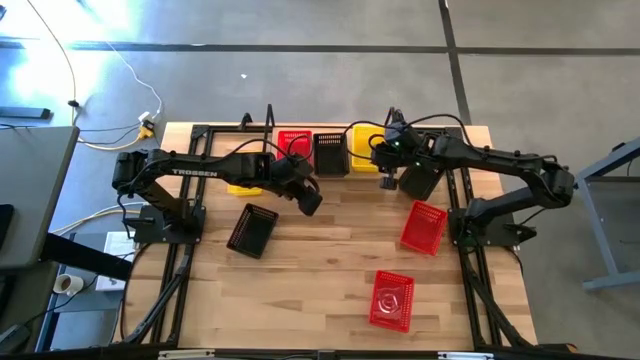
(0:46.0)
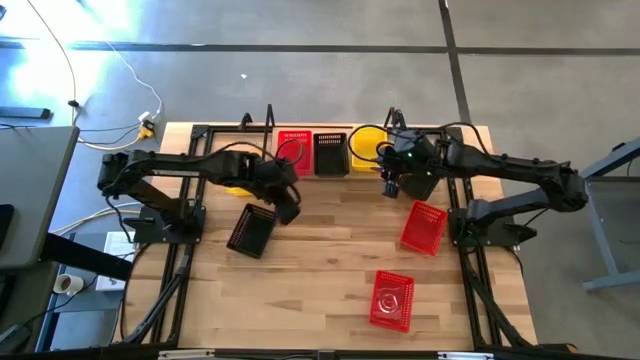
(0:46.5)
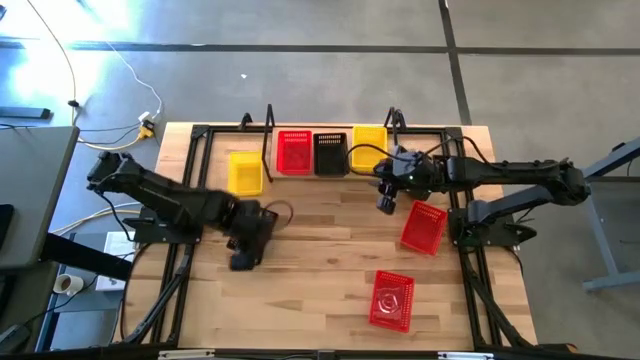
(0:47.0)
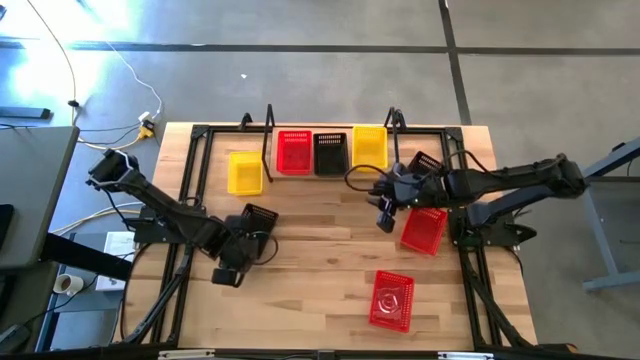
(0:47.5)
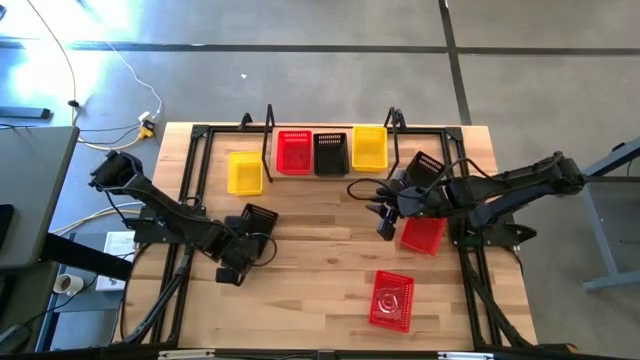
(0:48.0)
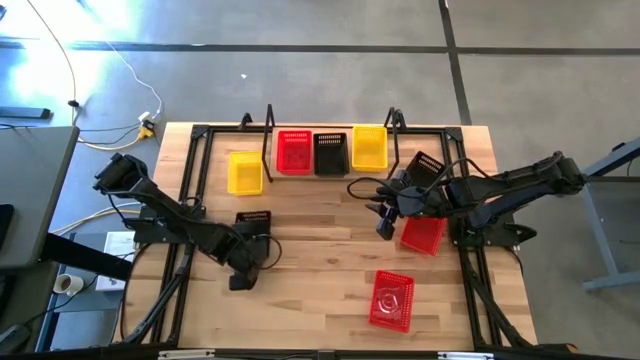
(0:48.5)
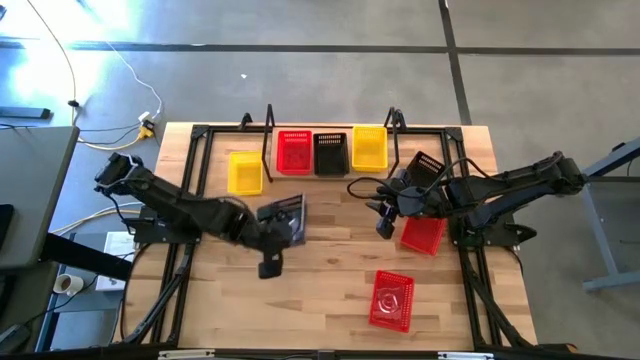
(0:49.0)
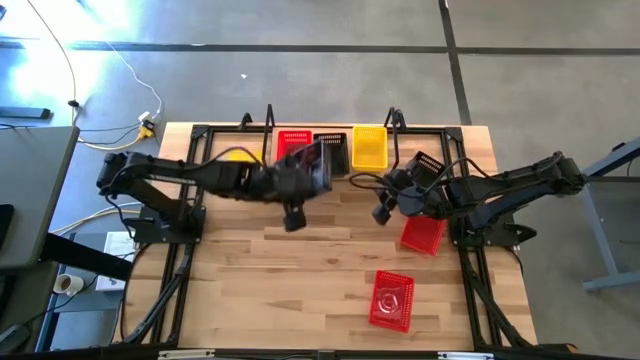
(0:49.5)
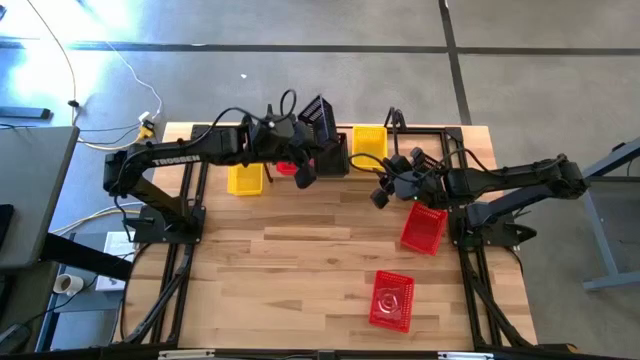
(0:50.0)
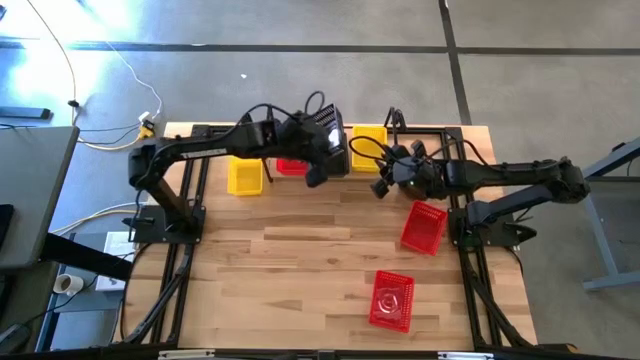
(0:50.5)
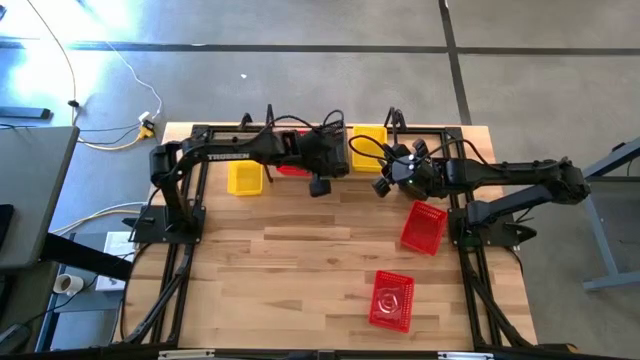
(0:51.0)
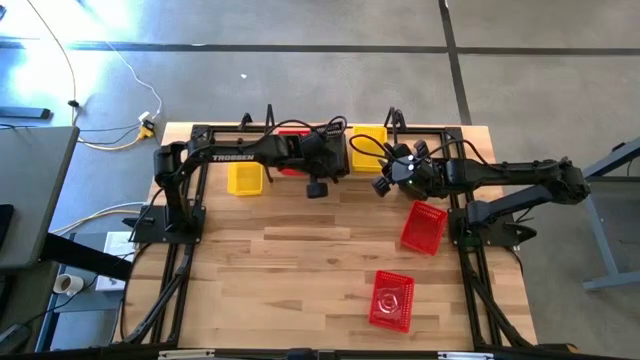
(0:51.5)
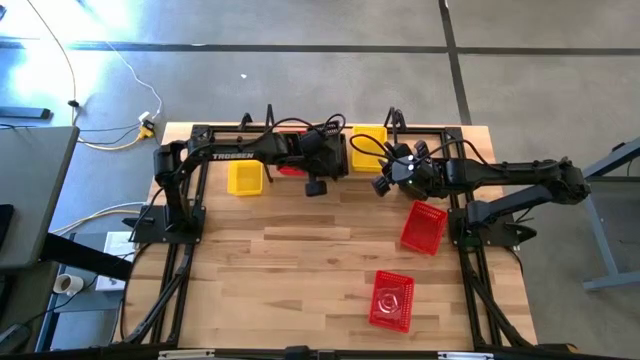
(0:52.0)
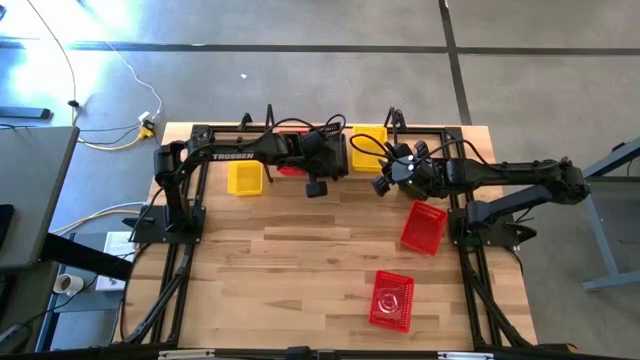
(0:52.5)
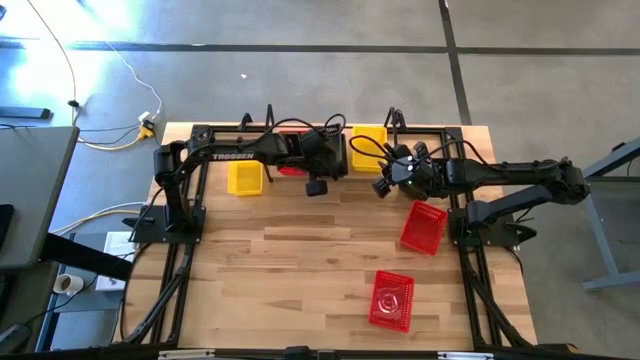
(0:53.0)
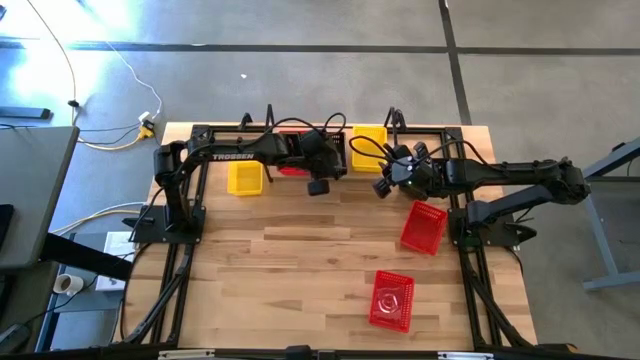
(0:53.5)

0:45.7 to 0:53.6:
Task: Stack baskets on shelf by color
Stack the bottom black bin on the black bins on the shelf

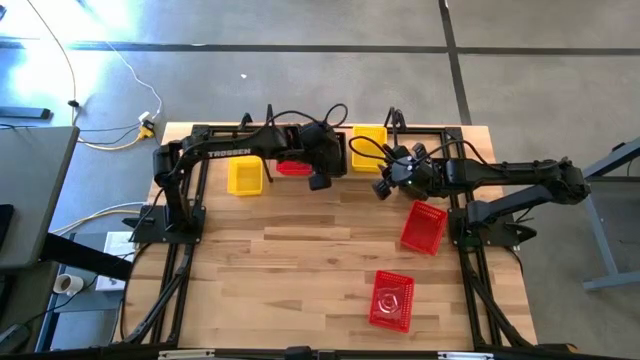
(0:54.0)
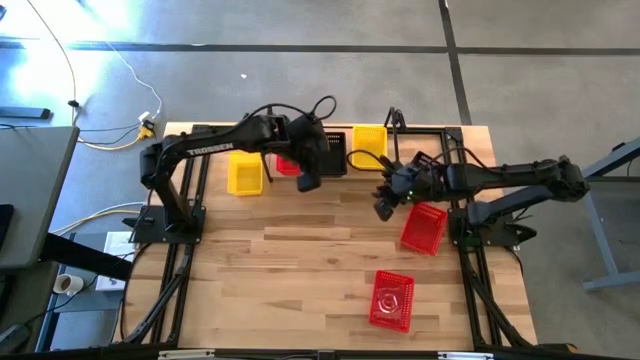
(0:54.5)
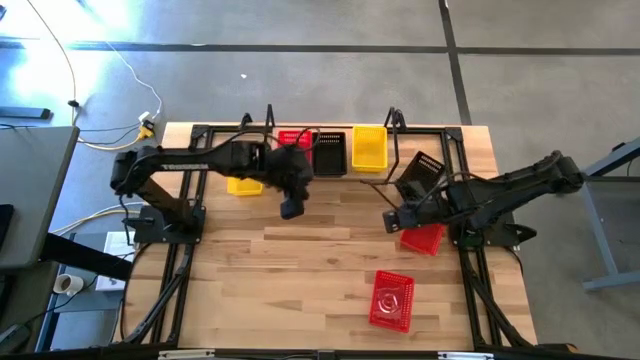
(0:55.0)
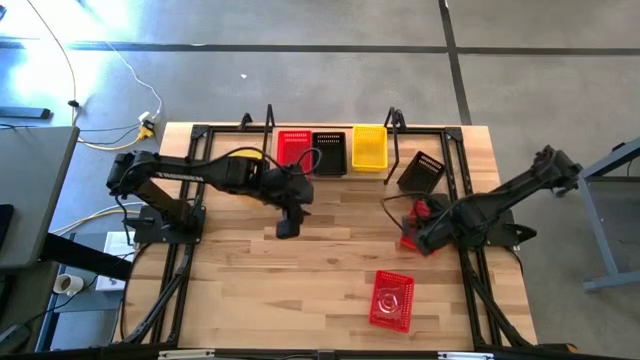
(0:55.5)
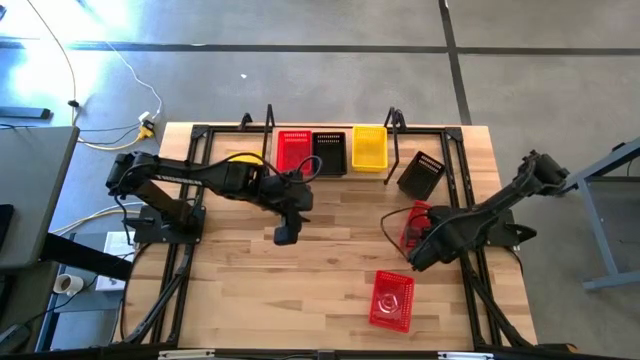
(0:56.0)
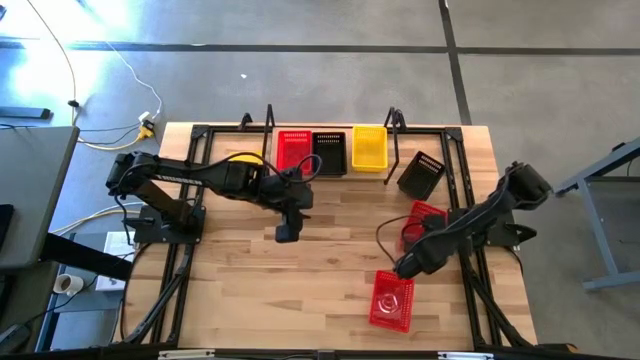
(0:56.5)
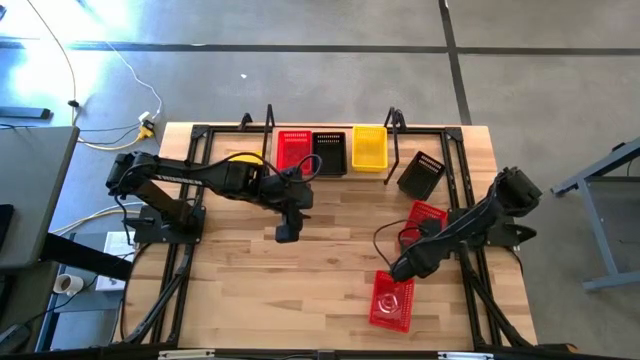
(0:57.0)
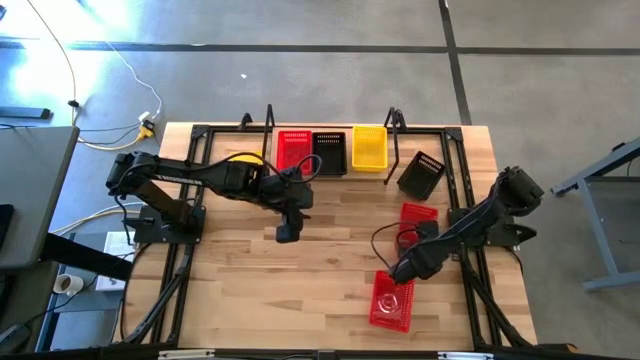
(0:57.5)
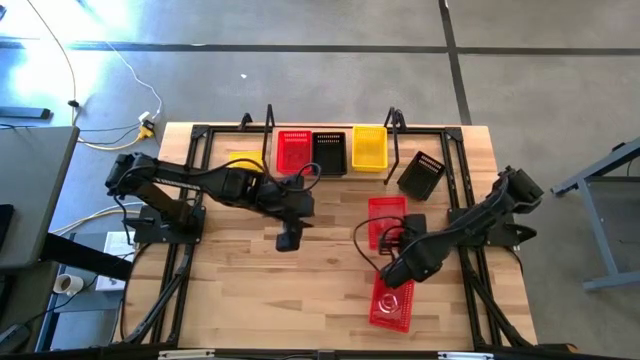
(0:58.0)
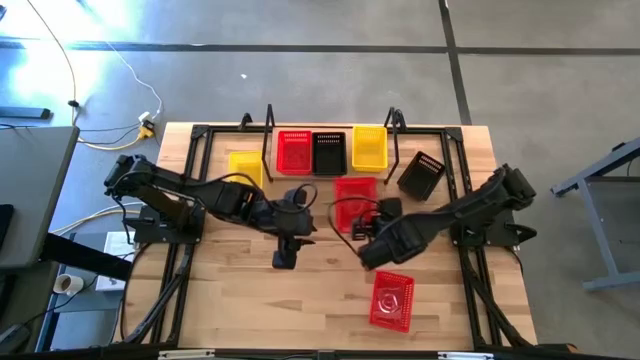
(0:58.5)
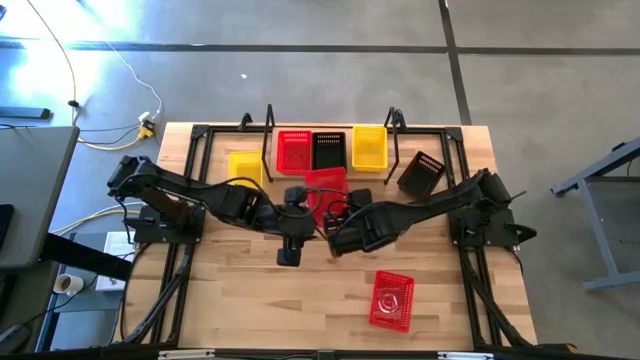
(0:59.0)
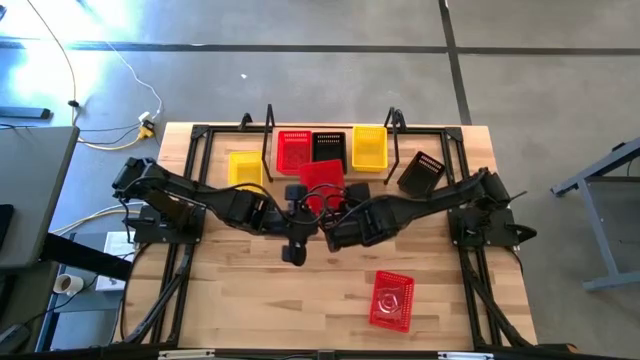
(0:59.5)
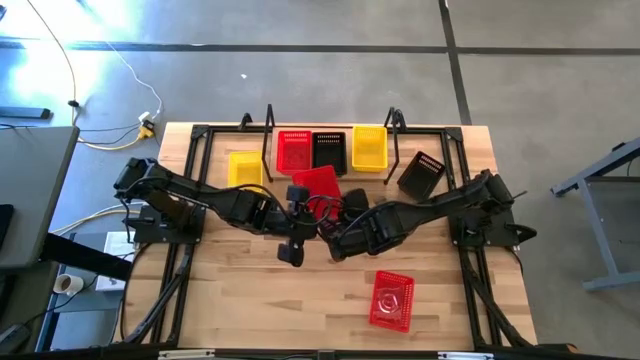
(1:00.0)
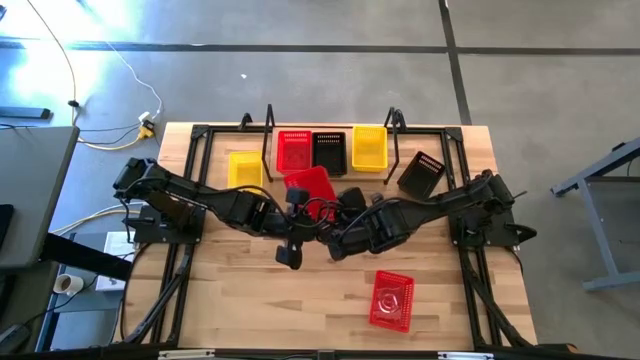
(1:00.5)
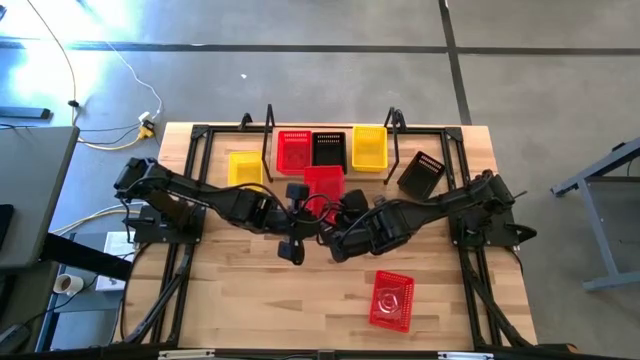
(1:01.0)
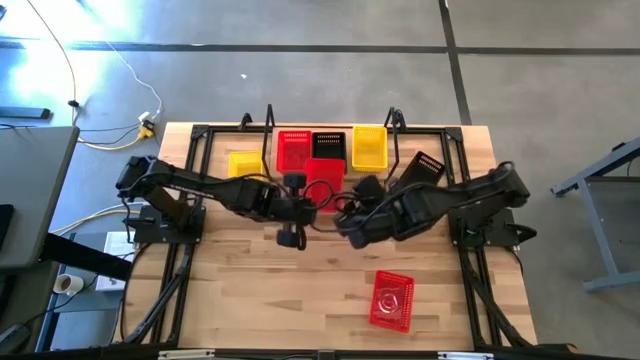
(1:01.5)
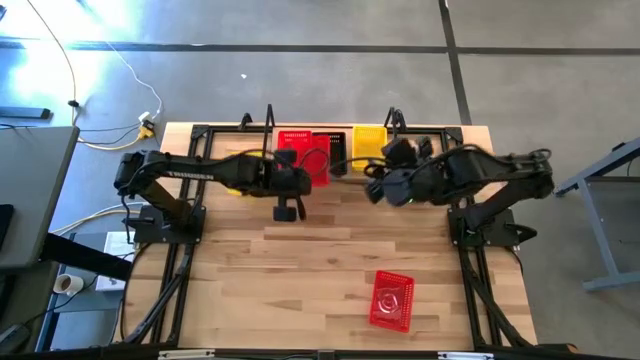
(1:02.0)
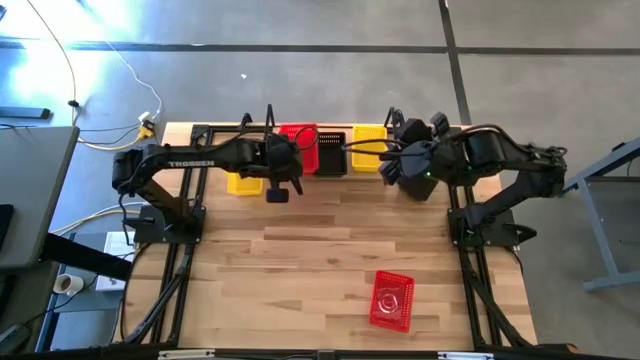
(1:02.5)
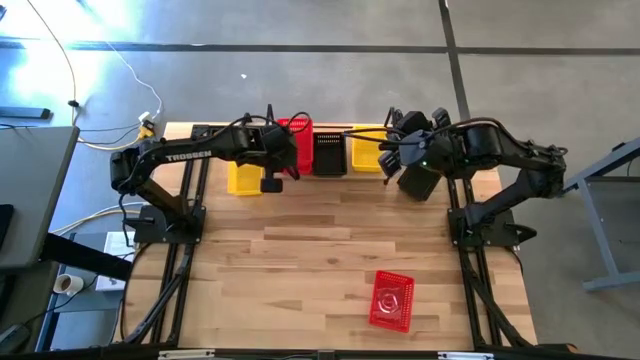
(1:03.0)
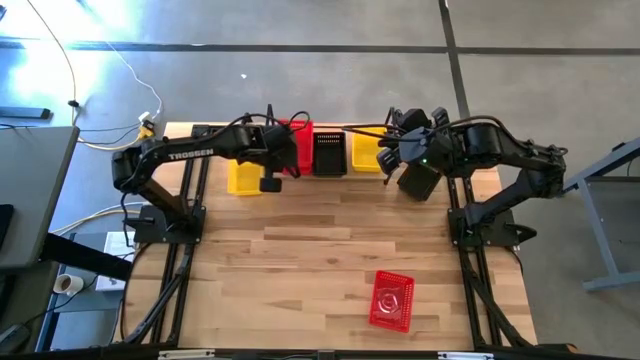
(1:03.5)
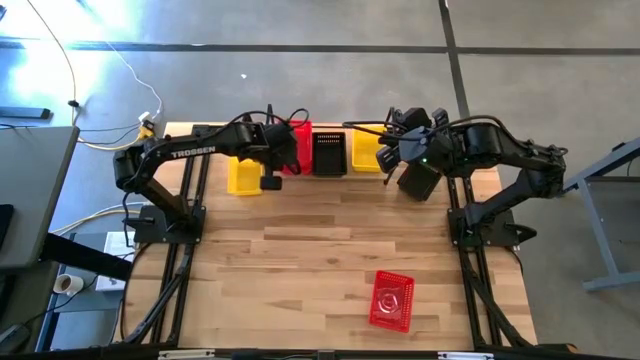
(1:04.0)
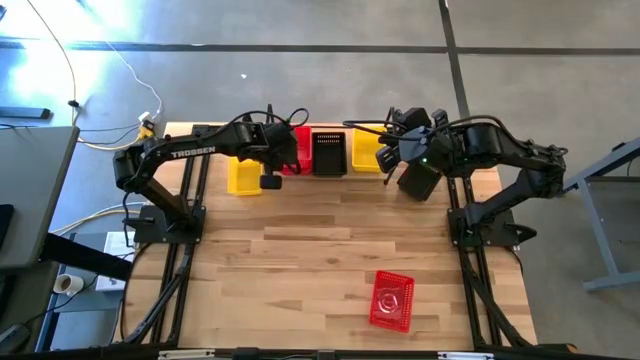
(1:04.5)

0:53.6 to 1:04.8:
Stack the bottom red bin on the red bin on the shelf

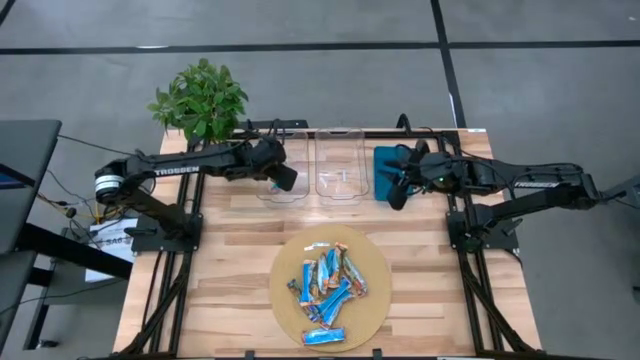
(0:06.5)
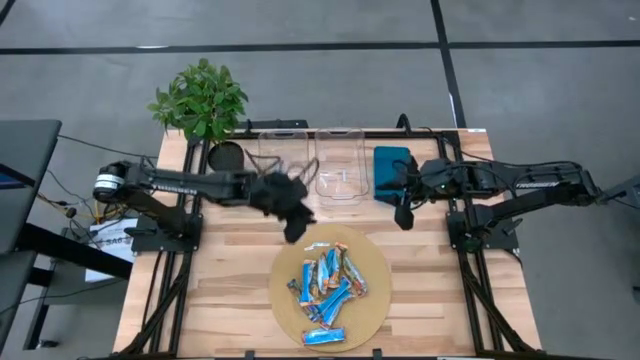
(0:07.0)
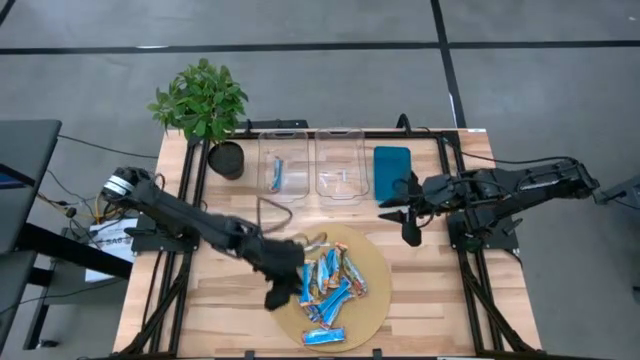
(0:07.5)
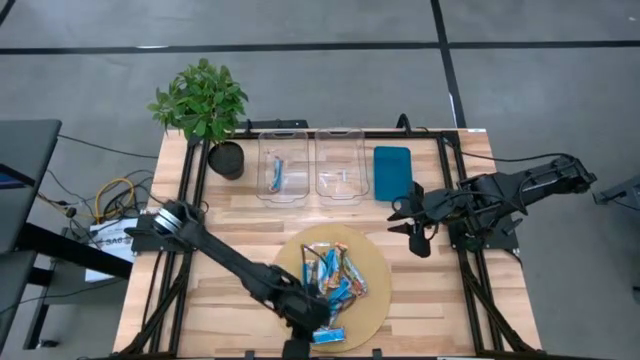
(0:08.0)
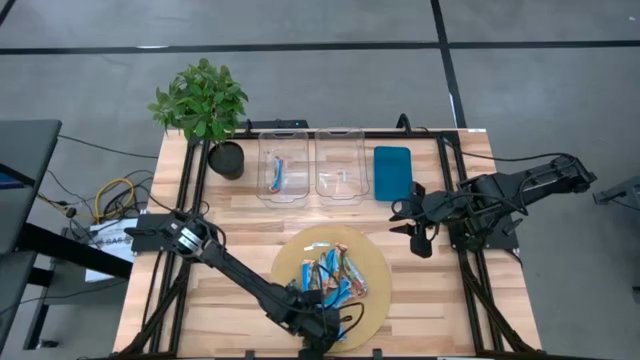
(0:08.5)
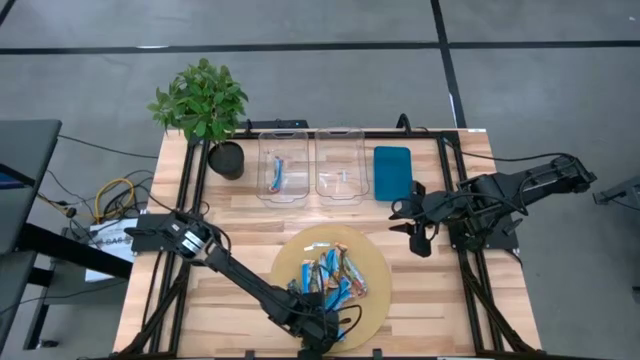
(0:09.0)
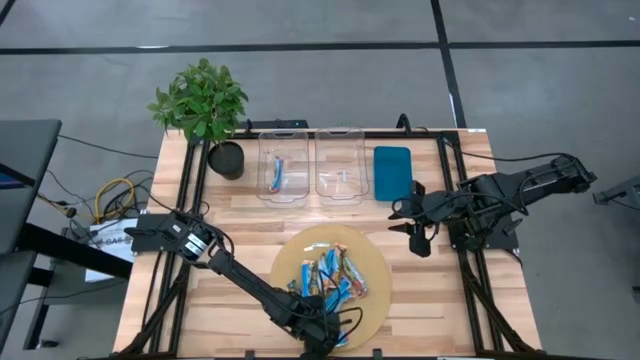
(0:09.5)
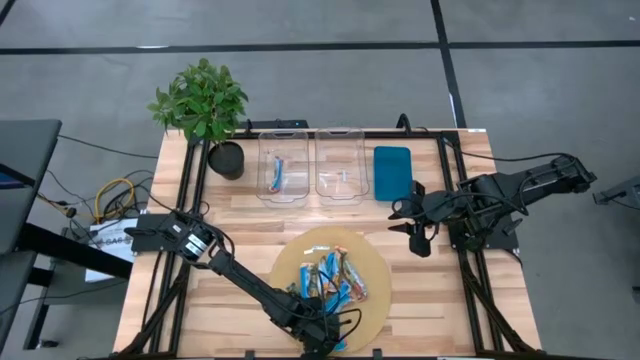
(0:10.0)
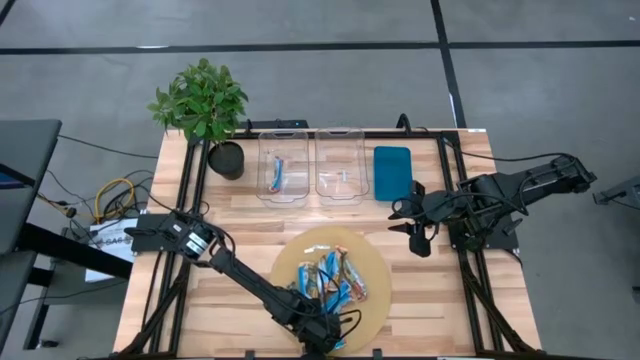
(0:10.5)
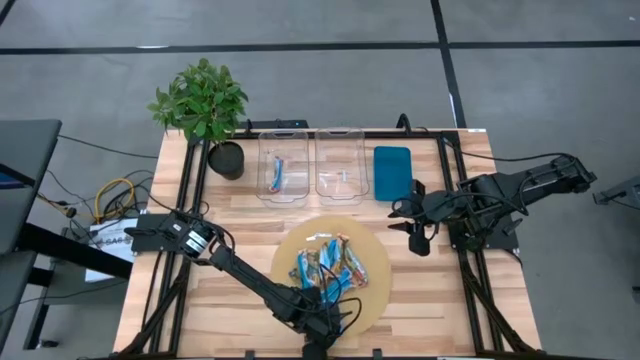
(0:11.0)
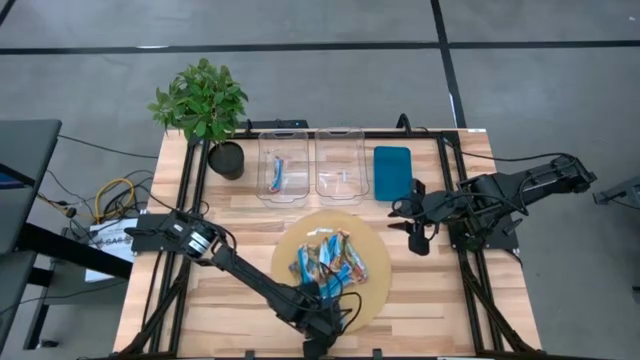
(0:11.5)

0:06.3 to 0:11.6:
Task: Pick and place Granola Bars by type
Put the bottom red granola bar into the left transparent bin
